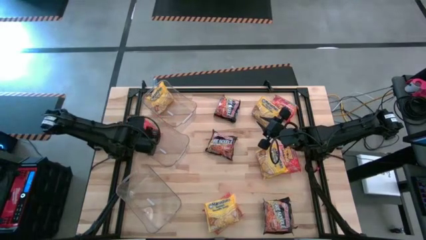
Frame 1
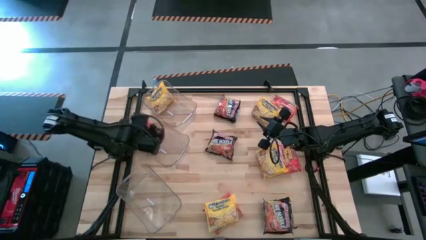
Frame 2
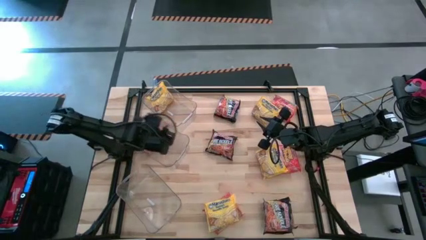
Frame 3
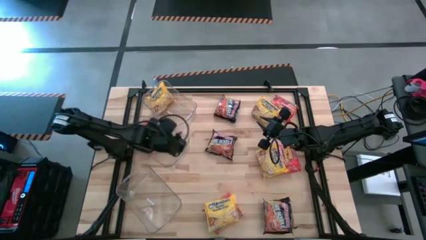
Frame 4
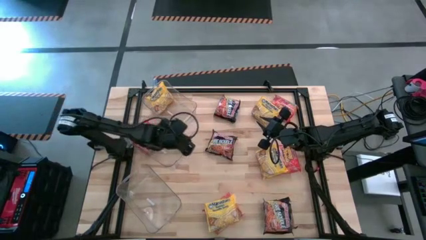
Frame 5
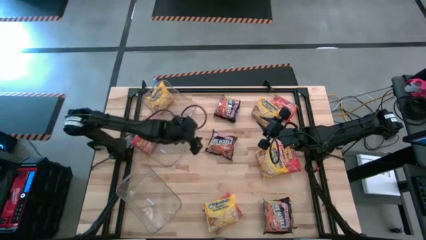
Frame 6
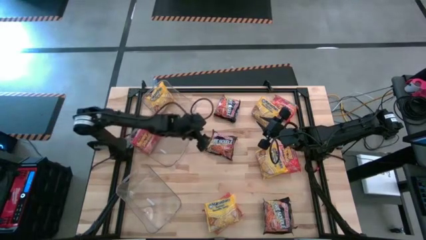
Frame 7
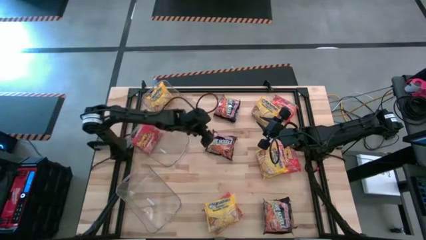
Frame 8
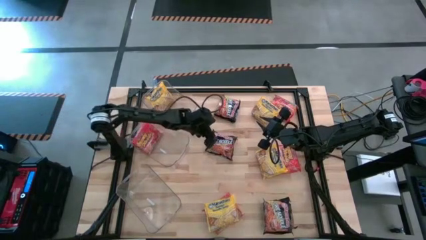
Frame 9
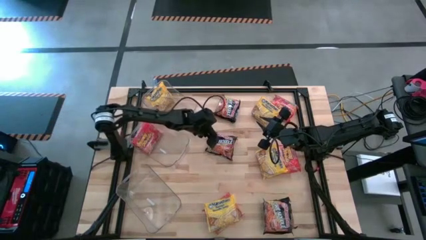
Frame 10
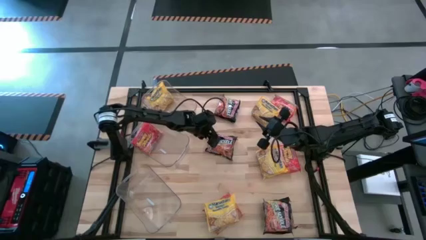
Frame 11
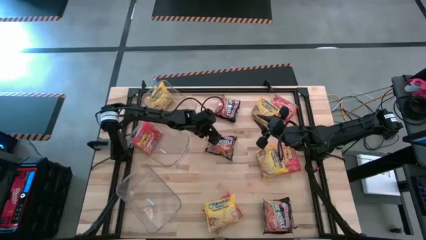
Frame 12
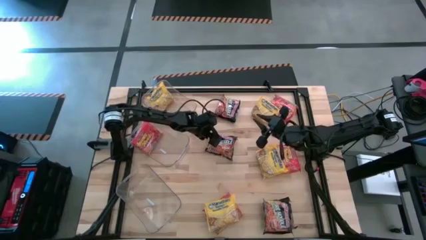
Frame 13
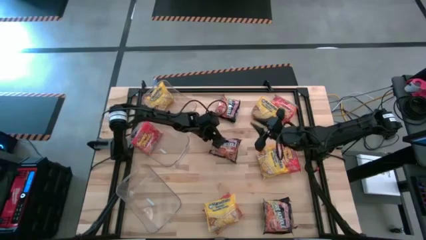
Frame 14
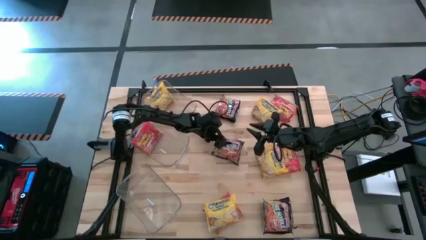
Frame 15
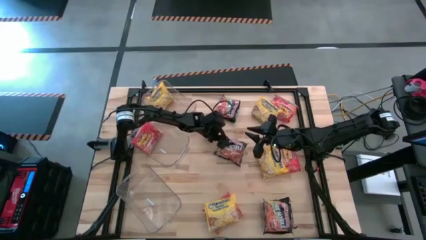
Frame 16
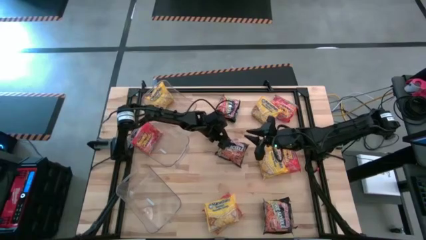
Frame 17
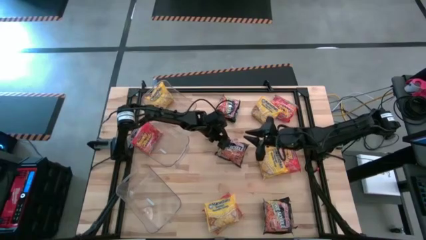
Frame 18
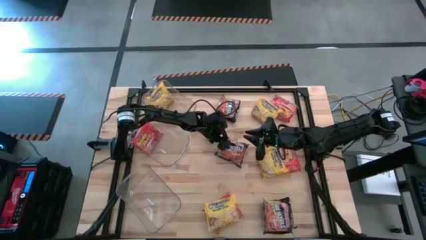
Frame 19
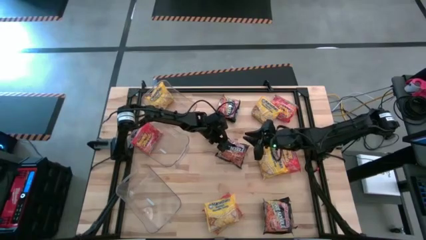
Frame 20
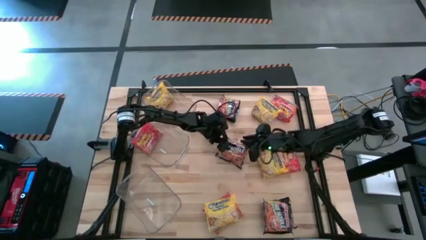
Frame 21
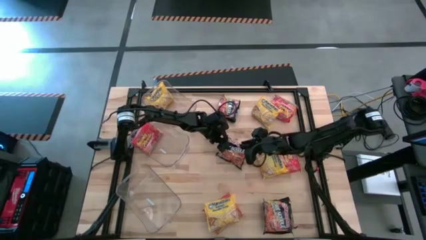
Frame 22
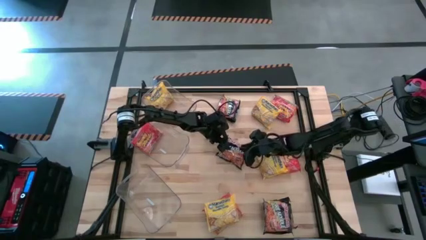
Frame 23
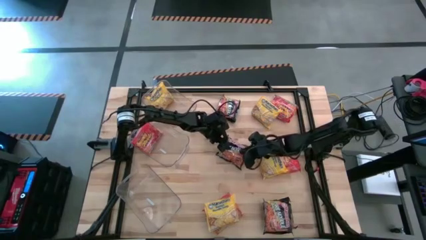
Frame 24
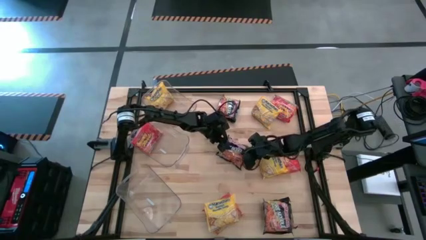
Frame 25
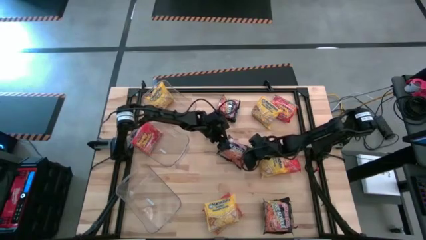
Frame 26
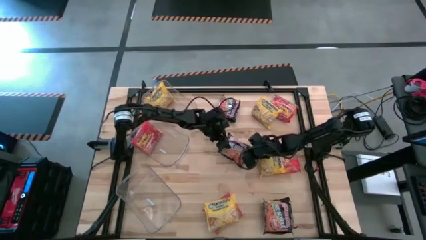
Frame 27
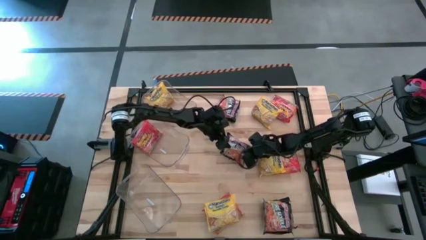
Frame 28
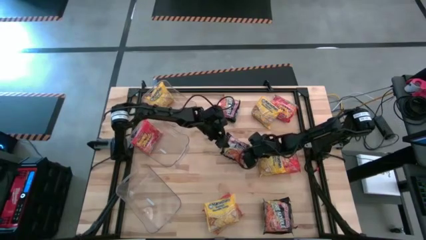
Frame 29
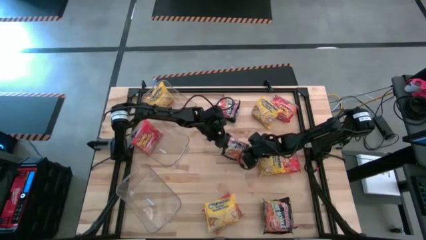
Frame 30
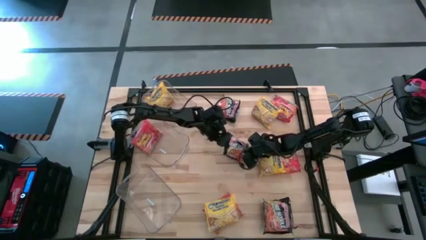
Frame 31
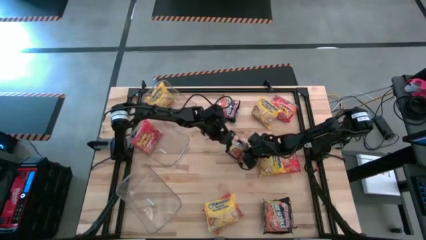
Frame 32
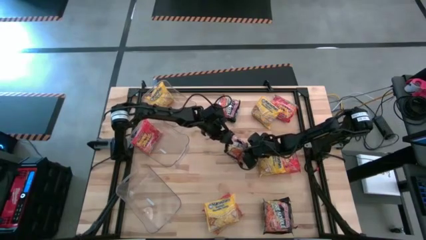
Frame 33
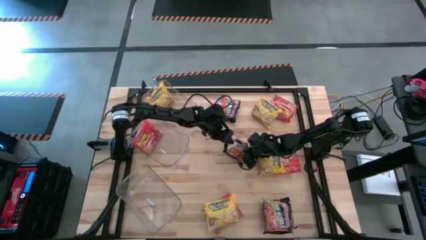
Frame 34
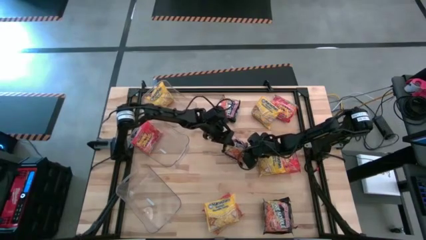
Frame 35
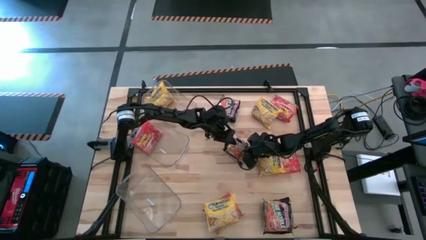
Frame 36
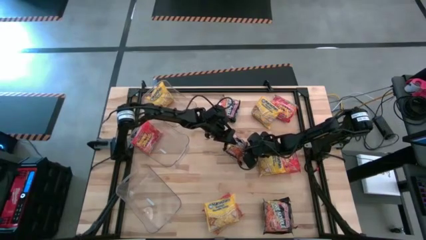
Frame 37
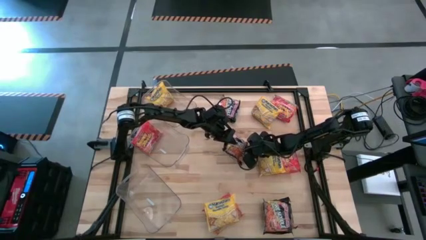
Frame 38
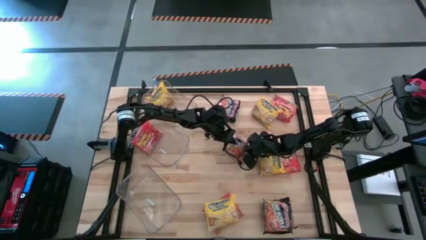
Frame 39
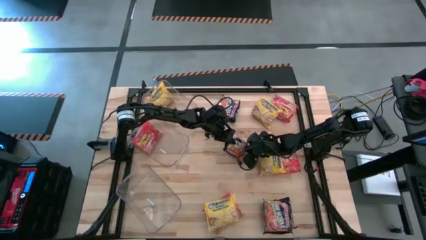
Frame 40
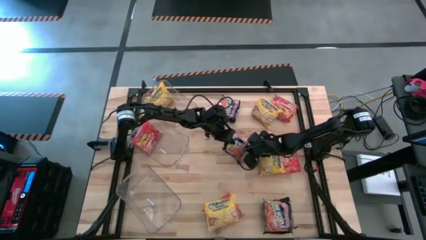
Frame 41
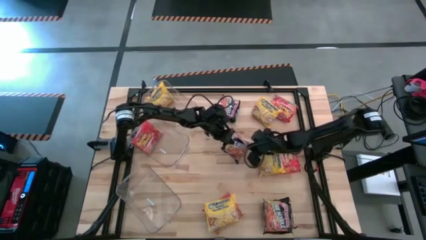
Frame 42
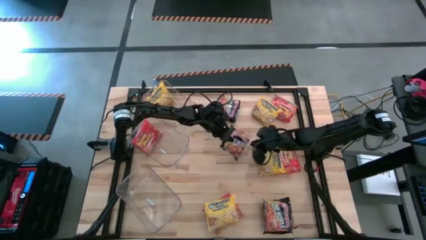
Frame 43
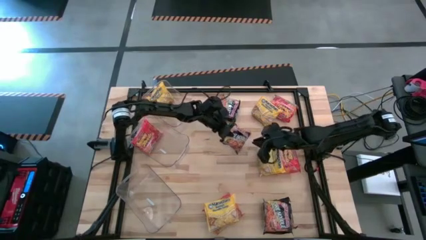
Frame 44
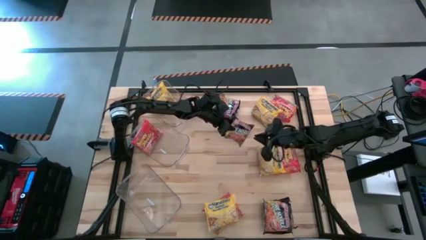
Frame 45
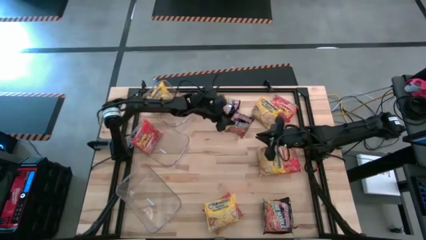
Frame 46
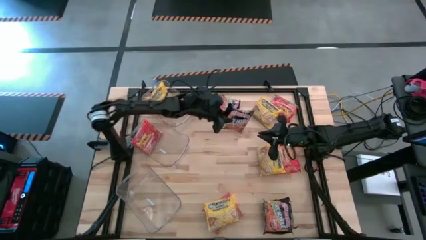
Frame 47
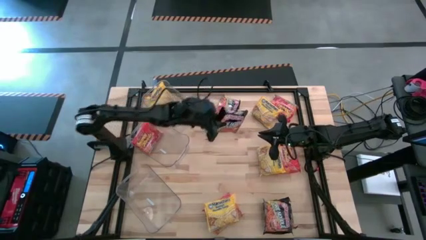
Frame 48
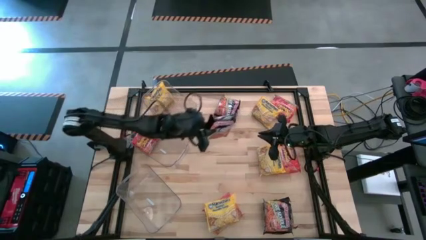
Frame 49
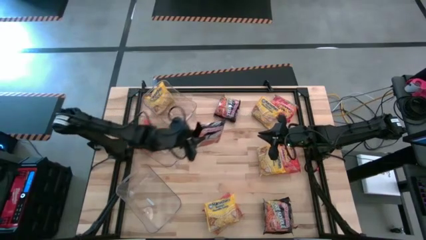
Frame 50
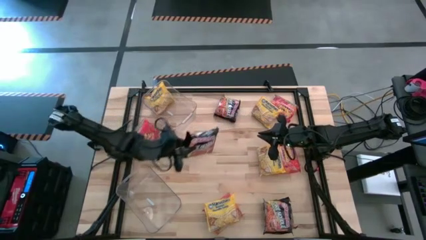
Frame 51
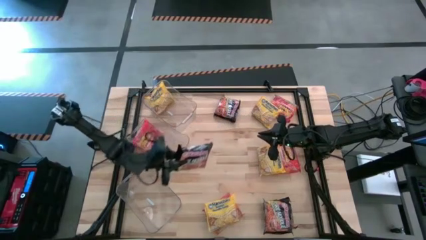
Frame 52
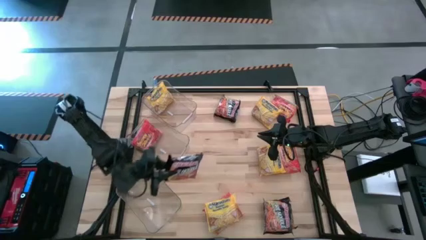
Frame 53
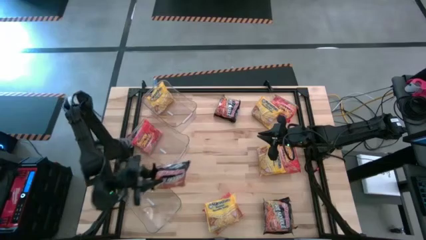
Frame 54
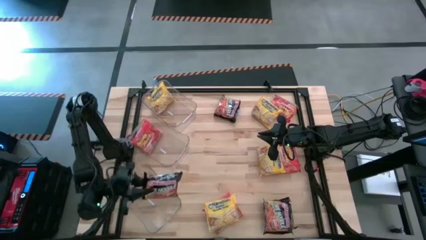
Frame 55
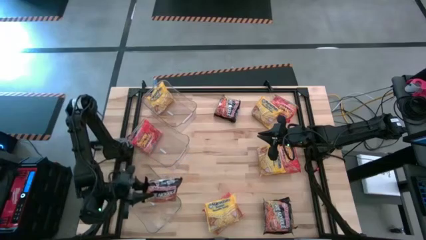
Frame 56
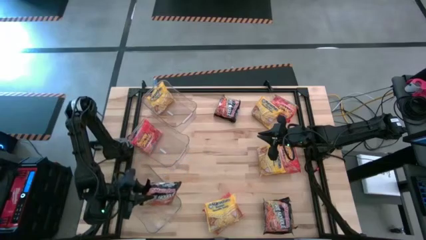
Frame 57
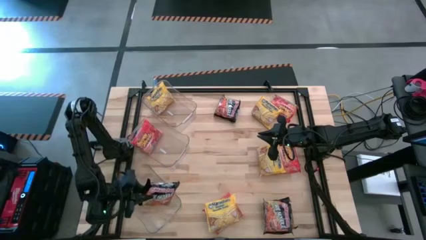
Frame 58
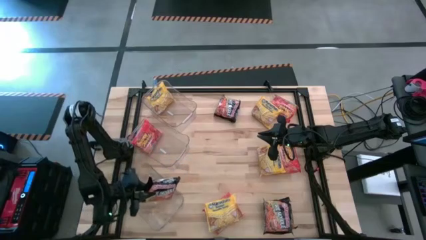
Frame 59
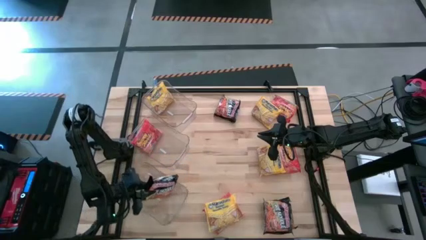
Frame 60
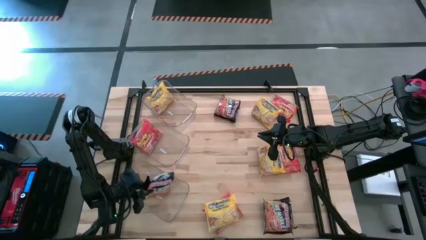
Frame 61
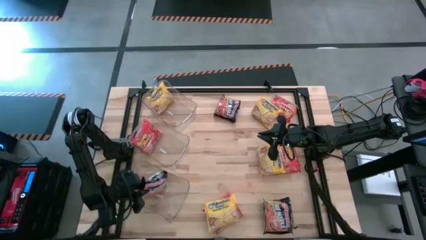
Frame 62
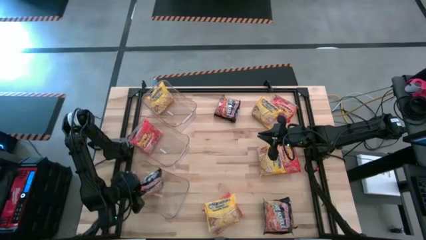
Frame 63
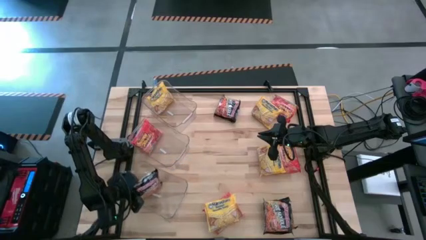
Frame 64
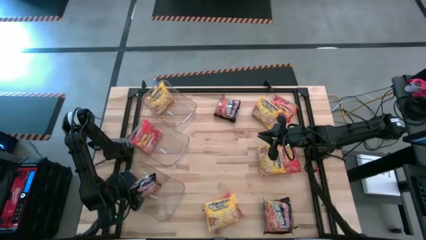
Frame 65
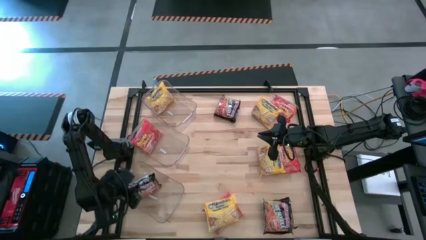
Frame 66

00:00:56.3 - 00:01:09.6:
Task: Sort Maruchan noodles
Put the noodles pack into the bottom transparent bin
